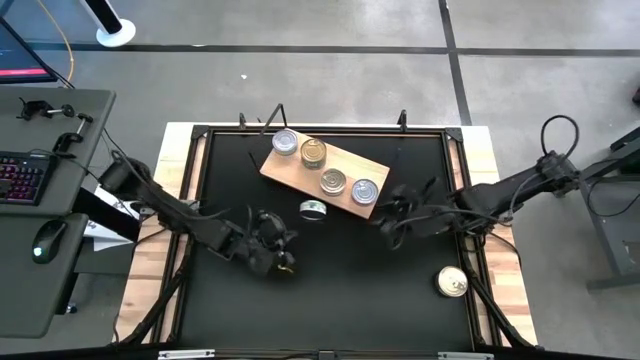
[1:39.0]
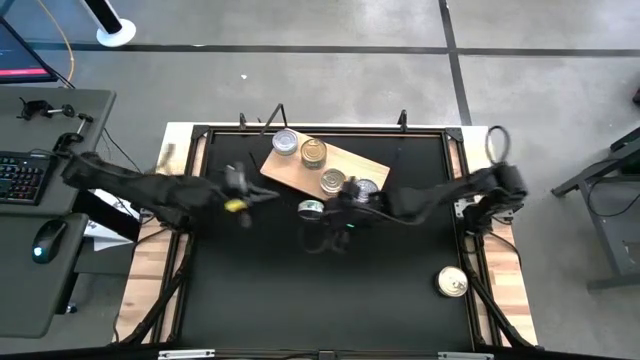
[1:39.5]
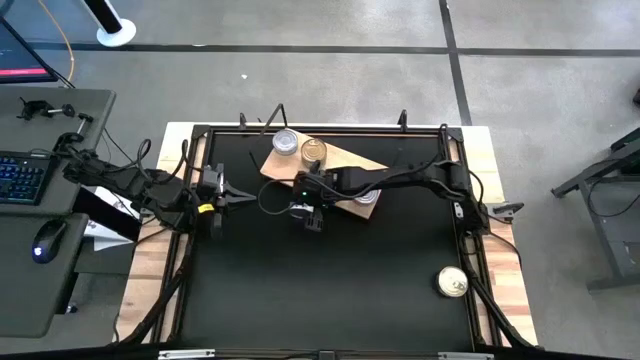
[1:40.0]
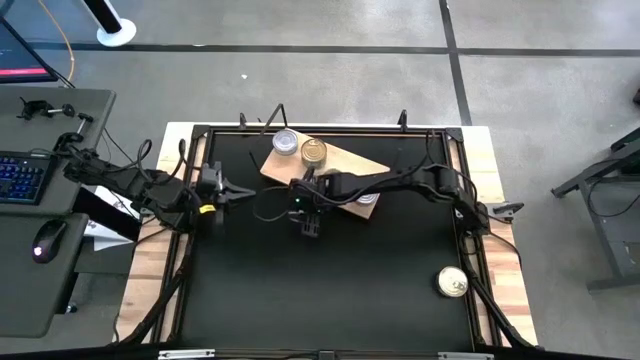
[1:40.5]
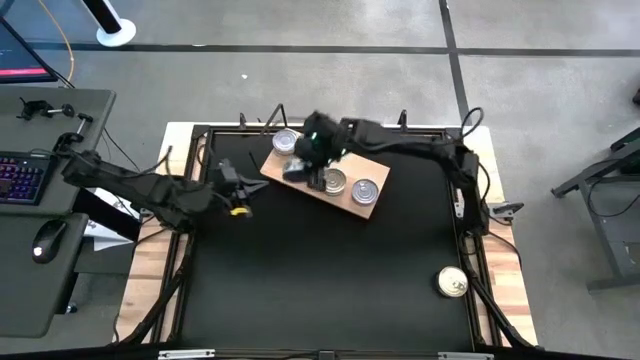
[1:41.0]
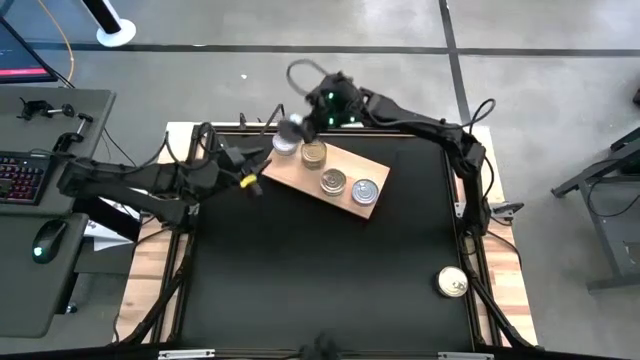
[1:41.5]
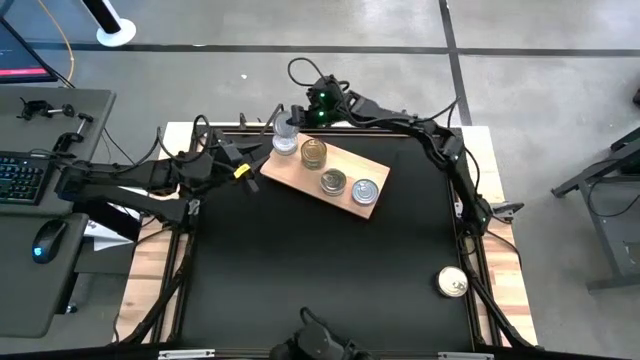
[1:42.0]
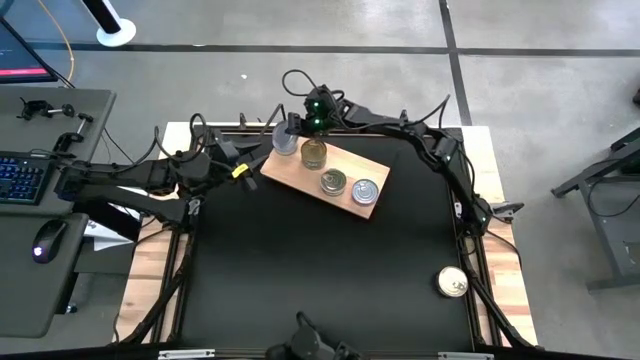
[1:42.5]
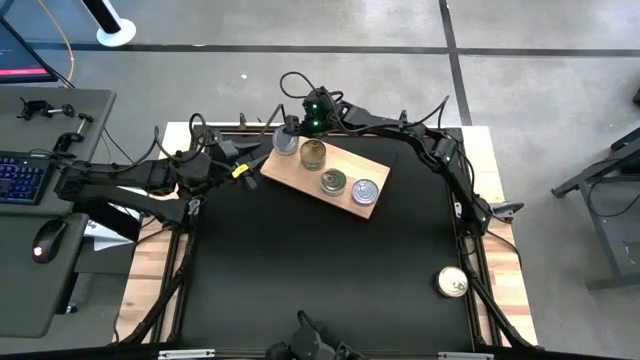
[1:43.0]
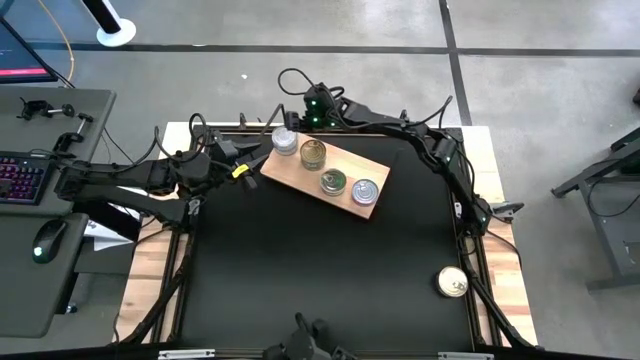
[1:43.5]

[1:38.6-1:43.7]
Task: Stack canned seafood by type on shelf
Stack the green tuna can on top of the other green tuna can on the shelf

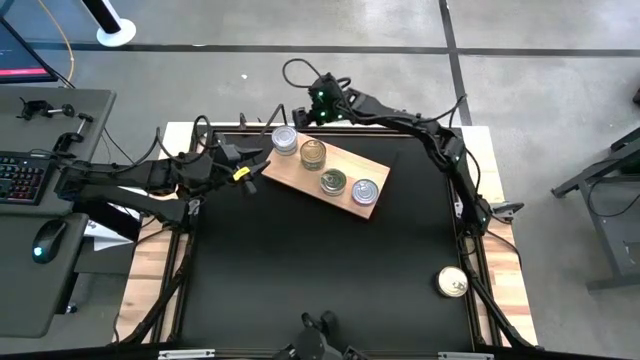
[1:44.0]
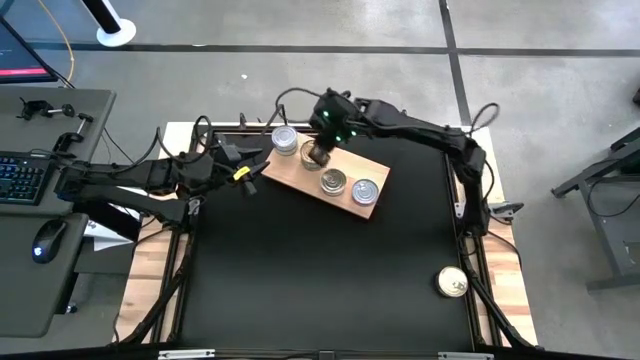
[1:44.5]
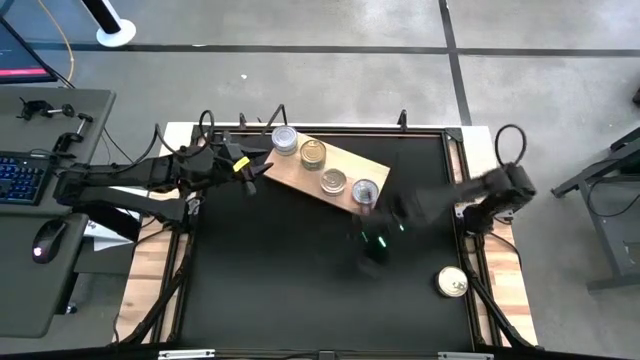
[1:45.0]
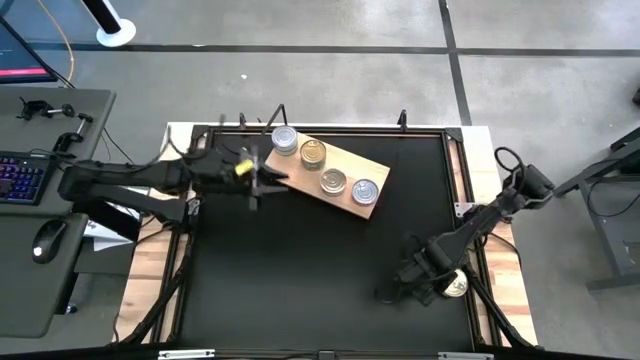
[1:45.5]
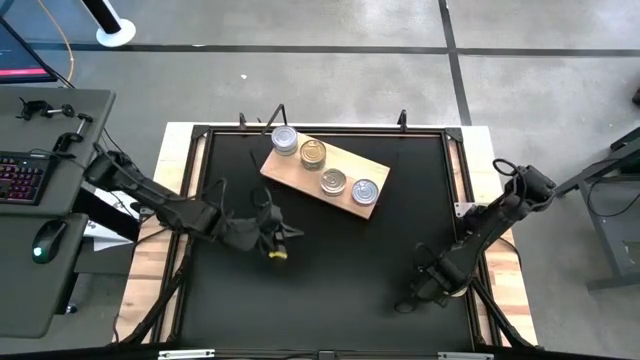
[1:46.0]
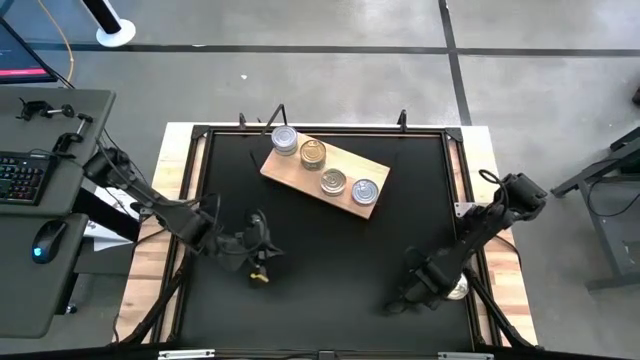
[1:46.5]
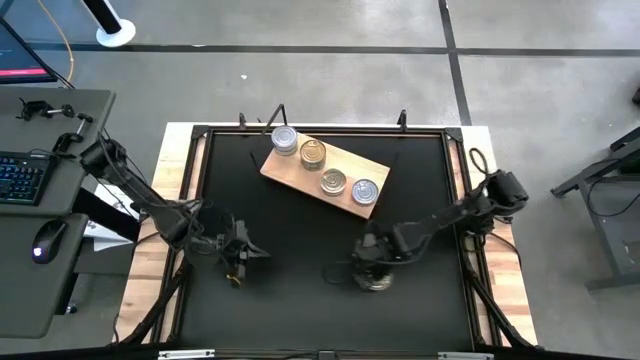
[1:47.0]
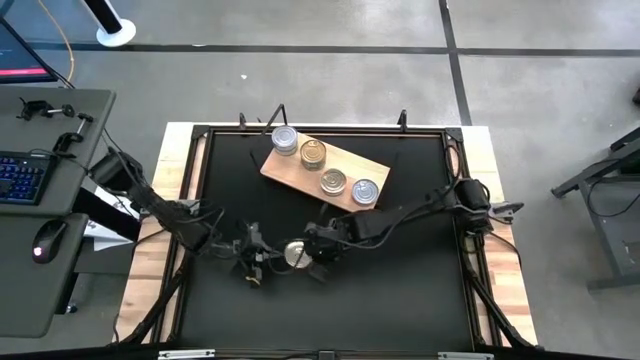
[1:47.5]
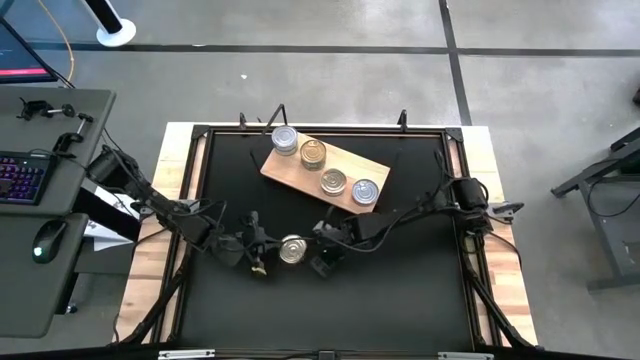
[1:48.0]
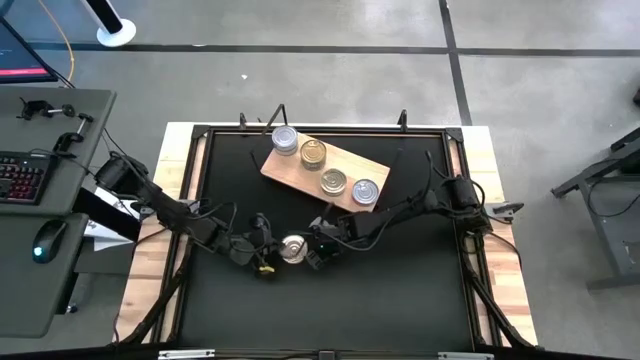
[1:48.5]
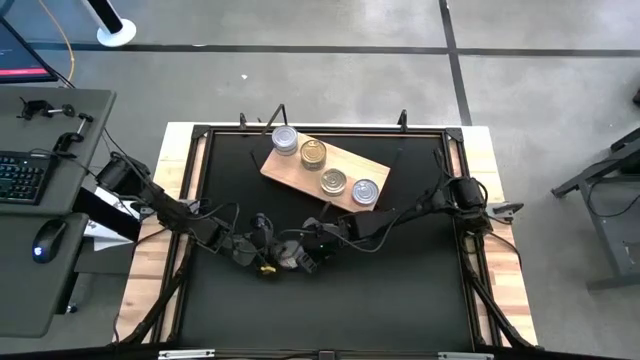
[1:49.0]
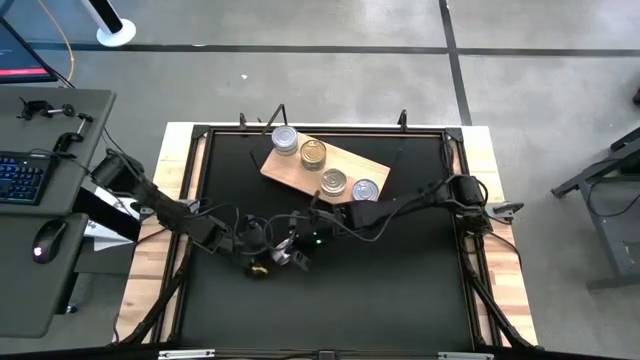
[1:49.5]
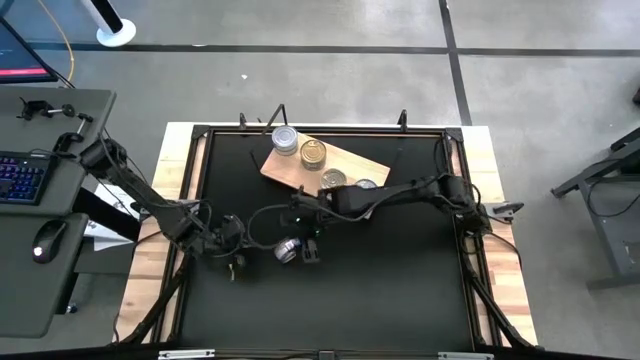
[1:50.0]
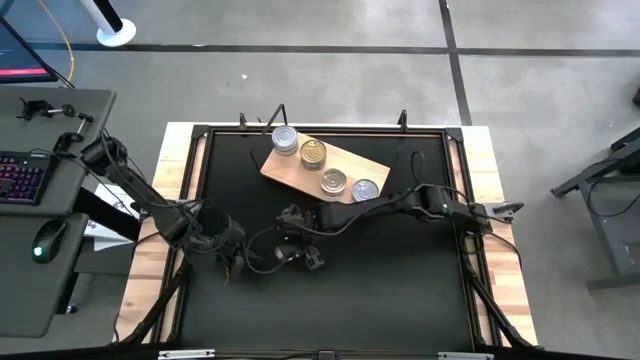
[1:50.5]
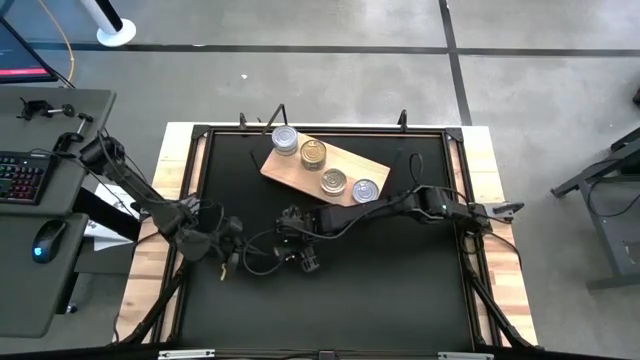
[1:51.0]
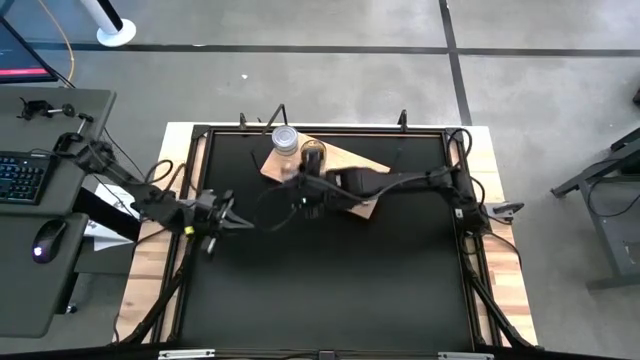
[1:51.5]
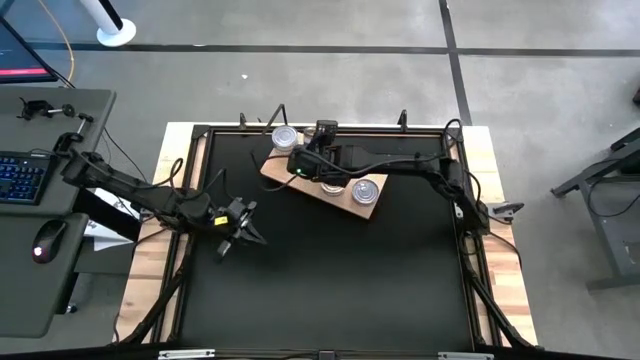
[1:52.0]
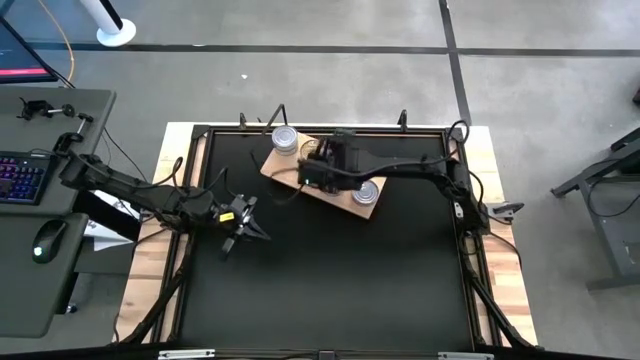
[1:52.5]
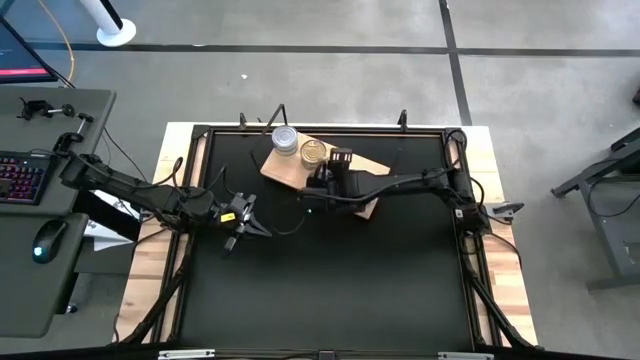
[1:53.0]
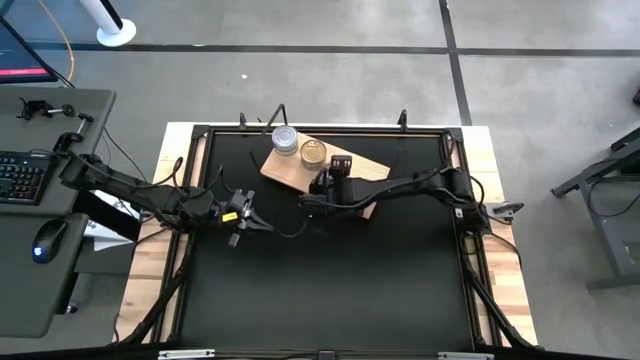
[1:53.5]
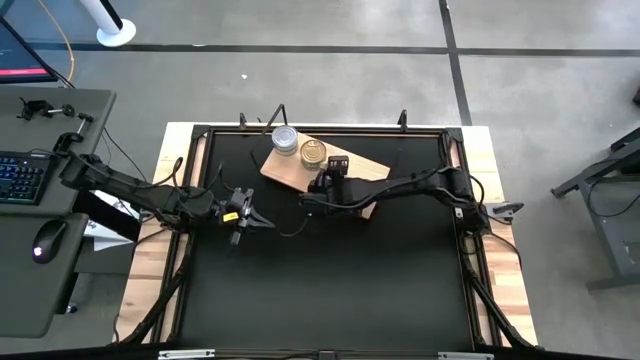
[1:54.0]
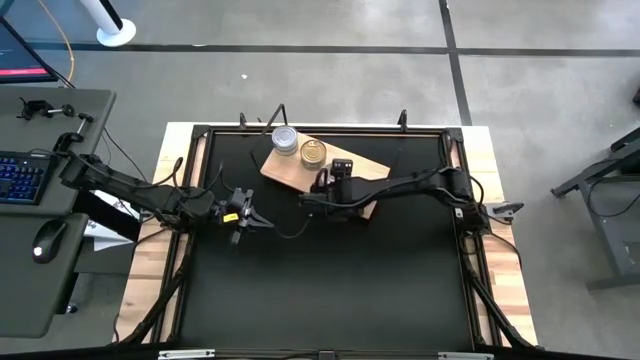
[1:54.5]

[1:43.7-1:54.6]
Stack the blue-pink tuna can on top of the other blue-pink tuna can on the shelf

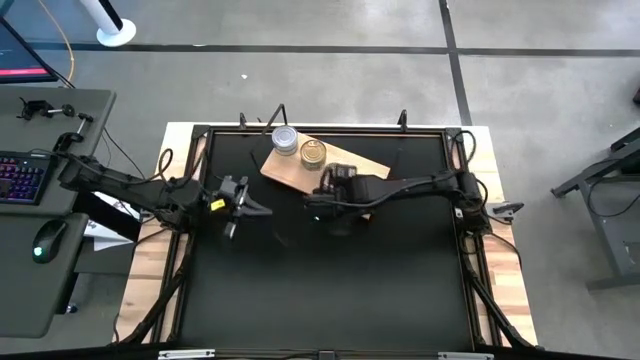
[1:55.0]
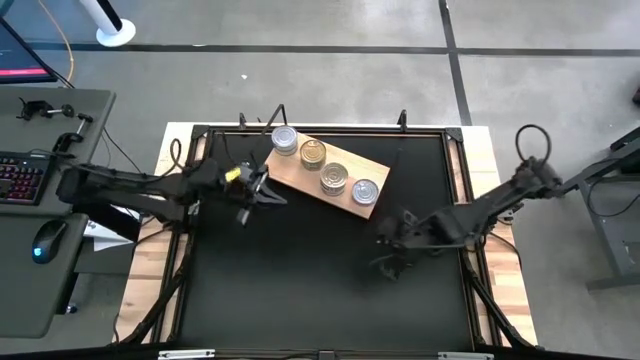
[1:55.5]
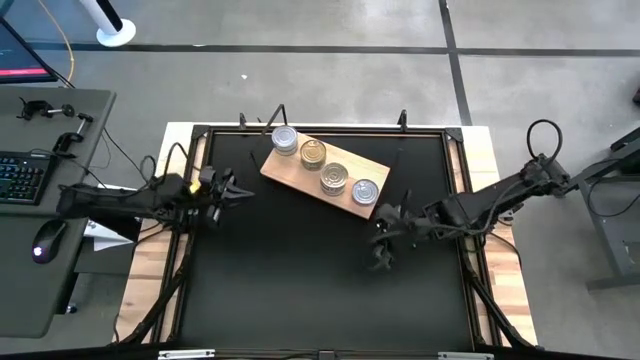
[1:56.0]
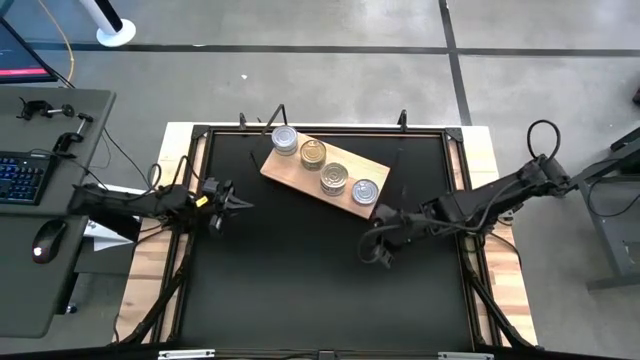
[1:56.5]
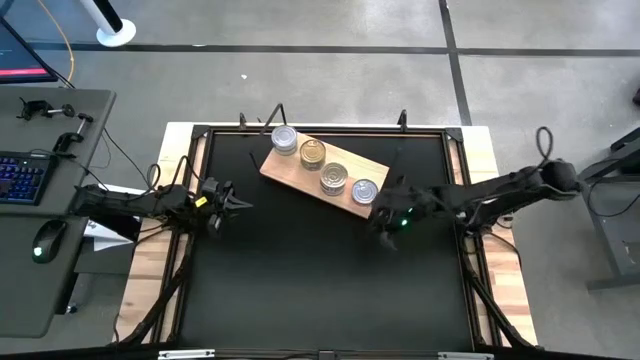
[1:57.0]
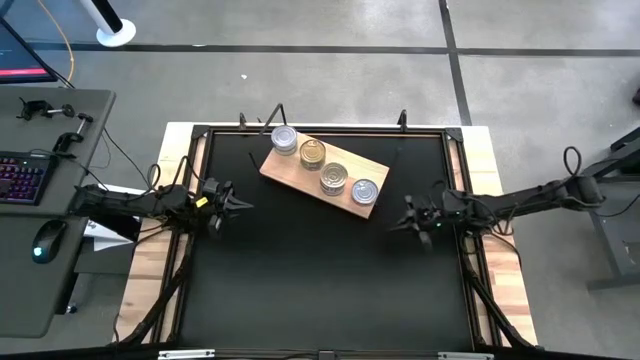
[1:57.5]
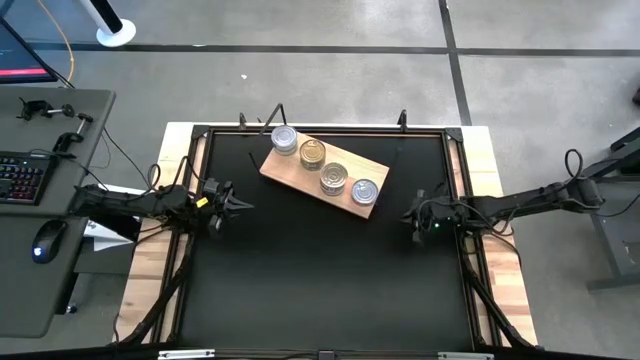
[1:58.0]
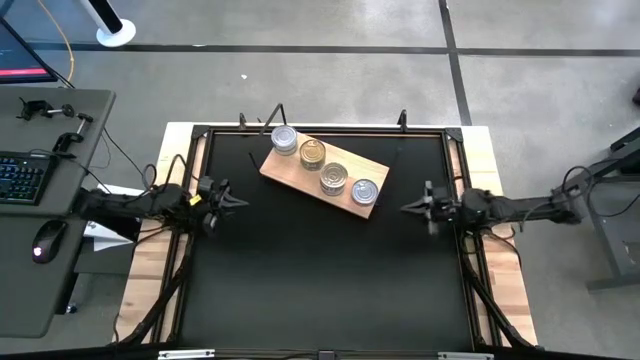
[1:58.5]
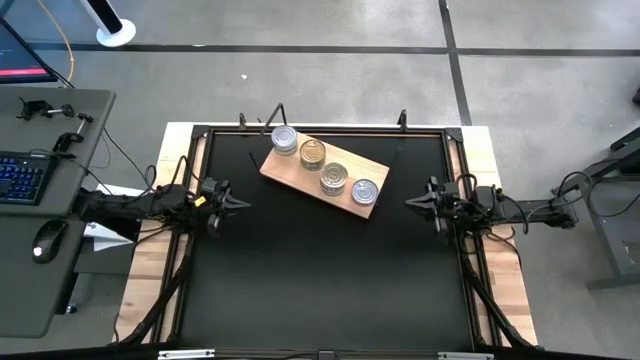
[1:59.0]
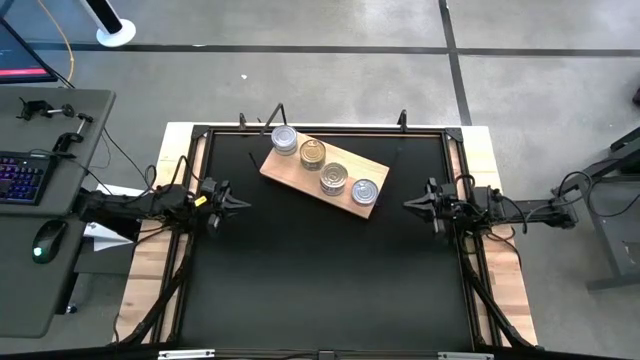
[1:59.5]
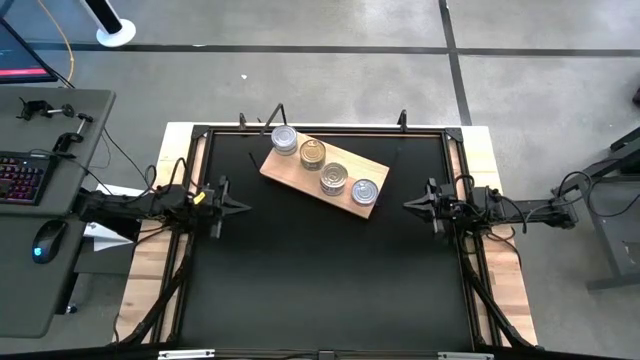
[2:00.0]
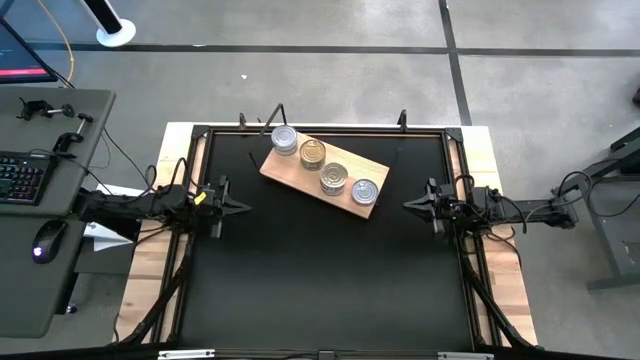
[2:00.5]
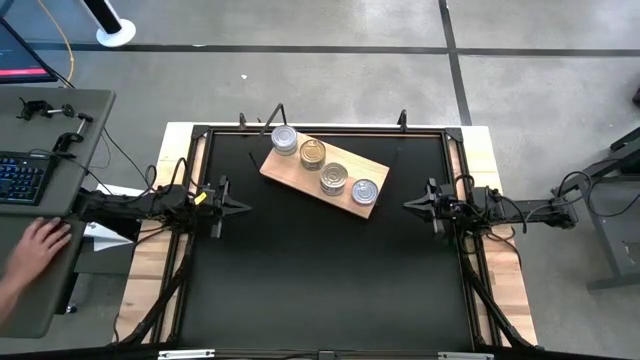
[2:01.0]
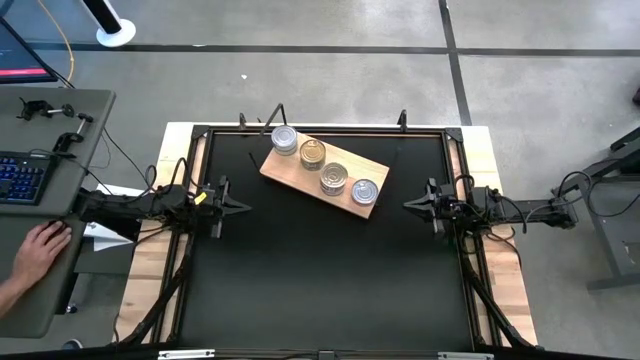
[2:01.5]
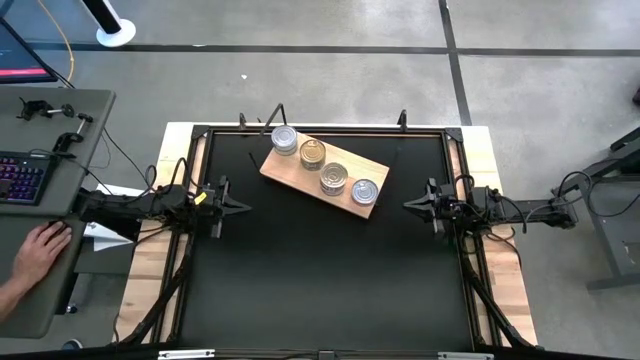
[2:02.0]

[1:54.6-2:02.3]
Return to Home Position
